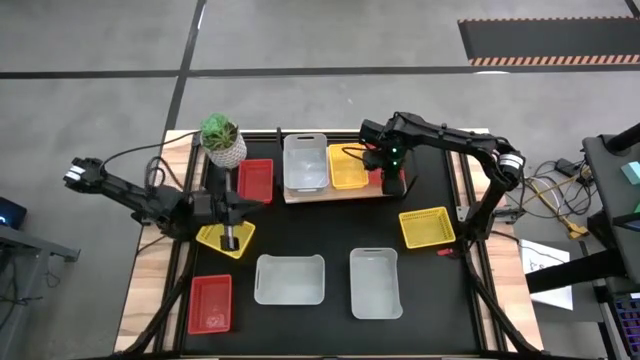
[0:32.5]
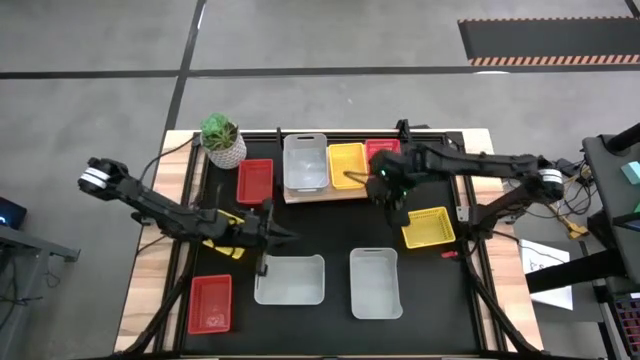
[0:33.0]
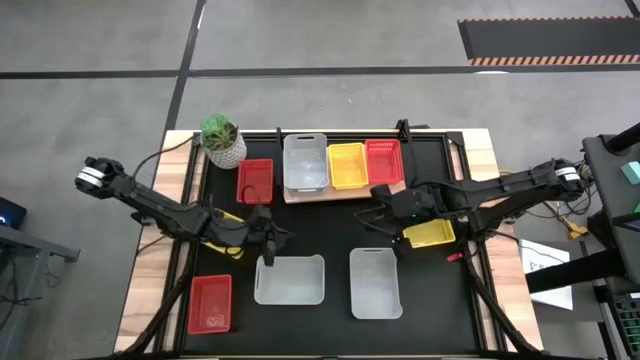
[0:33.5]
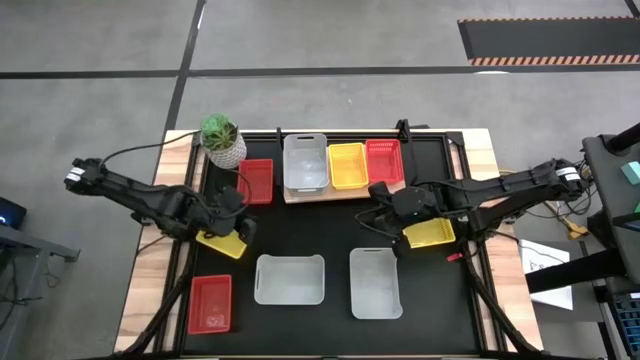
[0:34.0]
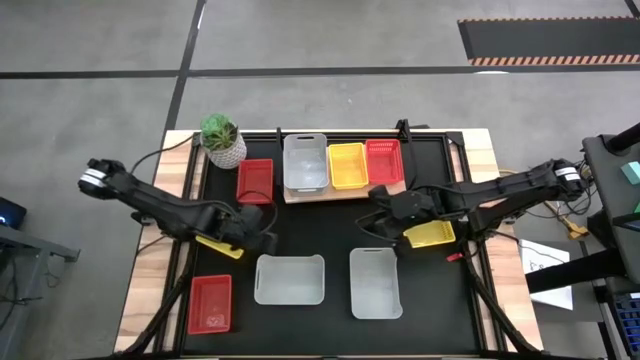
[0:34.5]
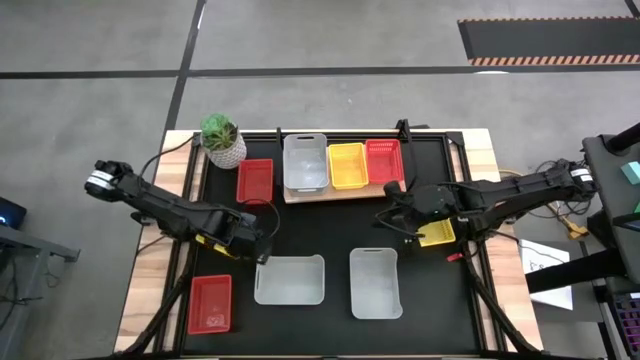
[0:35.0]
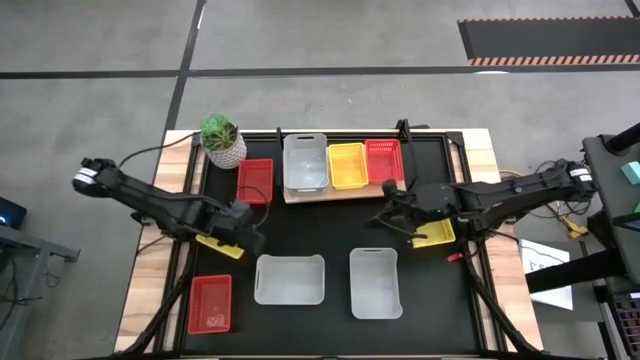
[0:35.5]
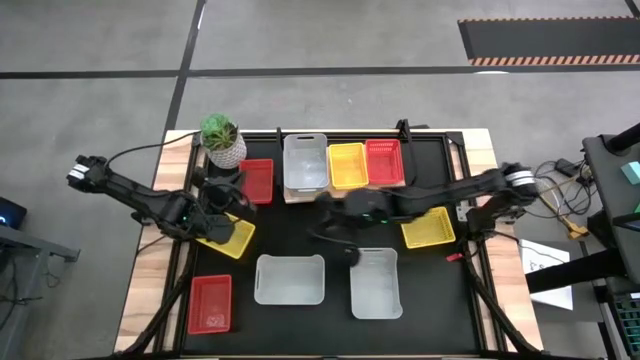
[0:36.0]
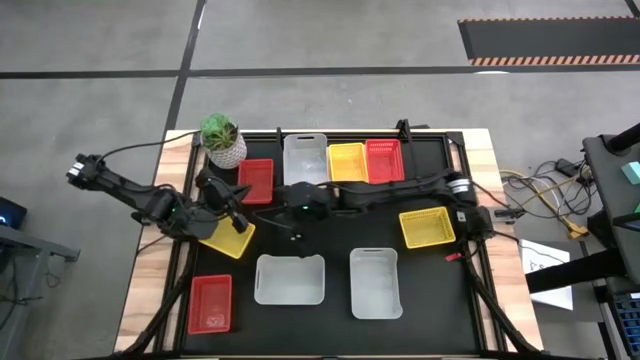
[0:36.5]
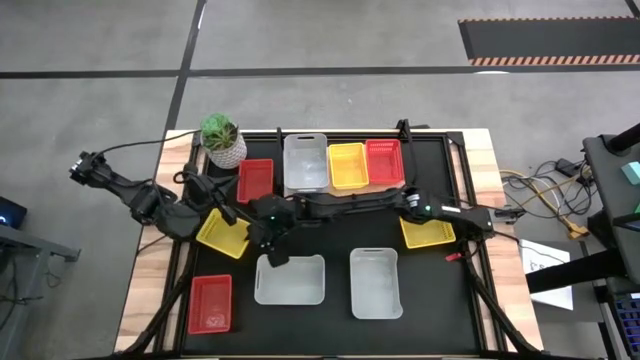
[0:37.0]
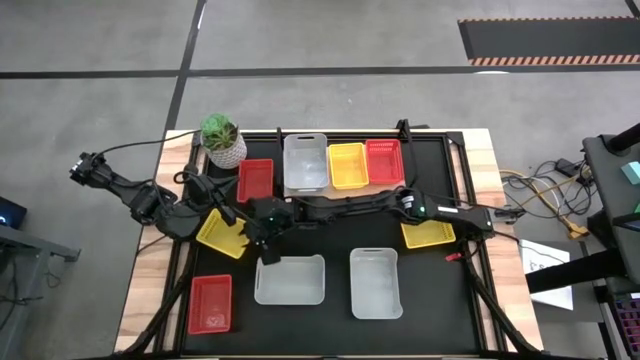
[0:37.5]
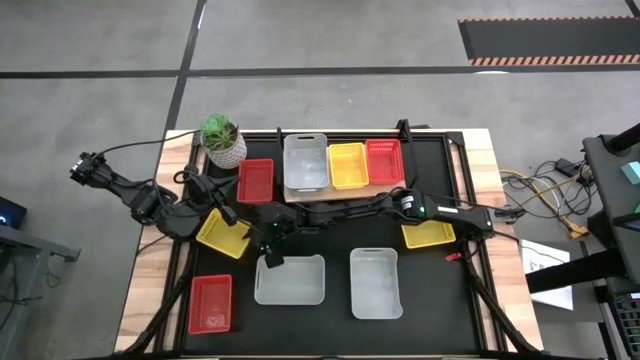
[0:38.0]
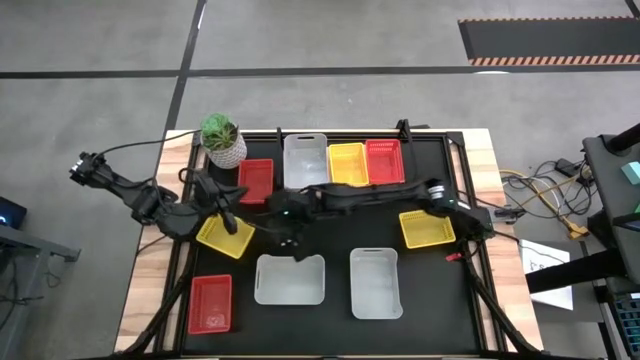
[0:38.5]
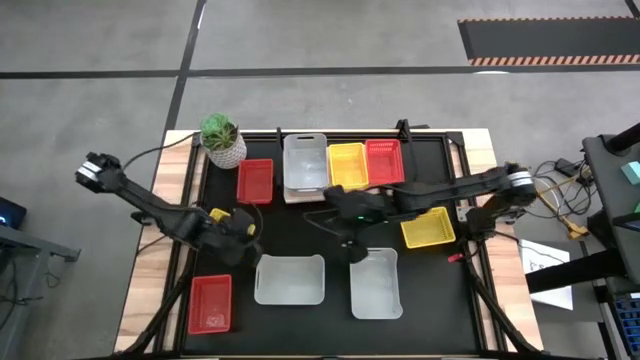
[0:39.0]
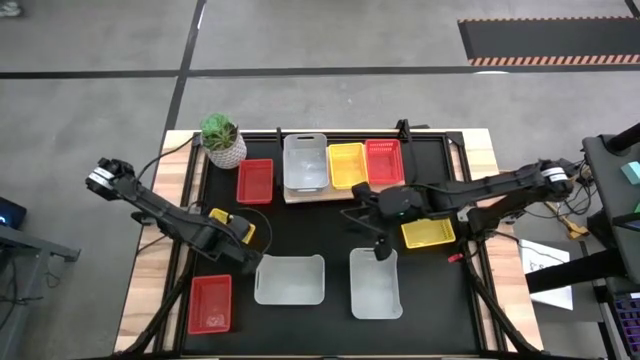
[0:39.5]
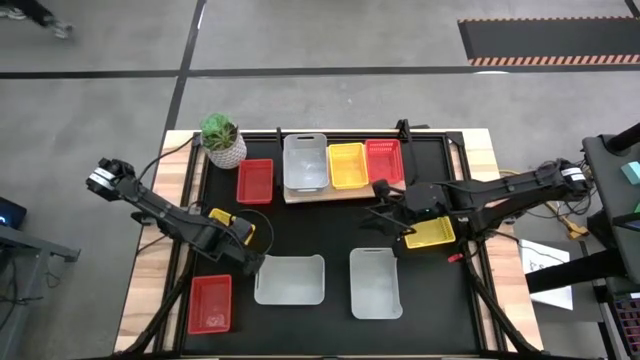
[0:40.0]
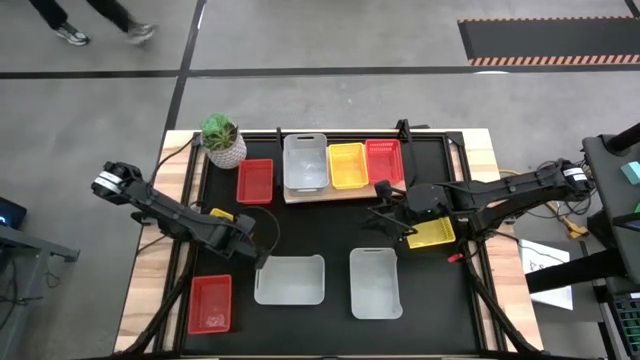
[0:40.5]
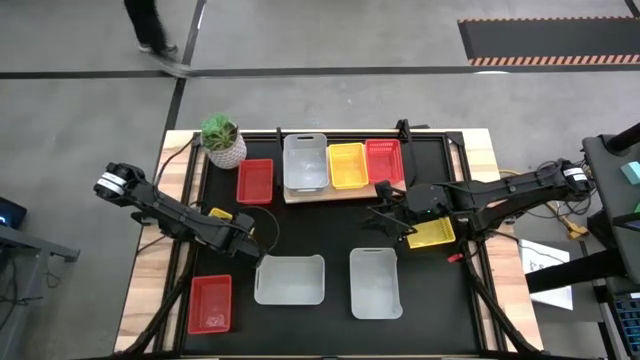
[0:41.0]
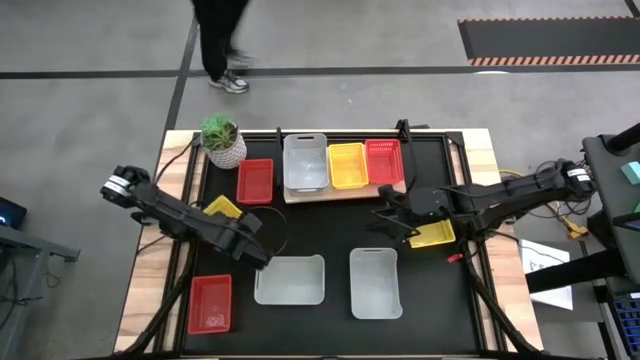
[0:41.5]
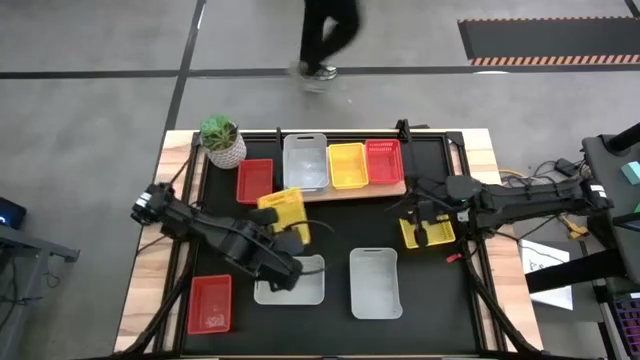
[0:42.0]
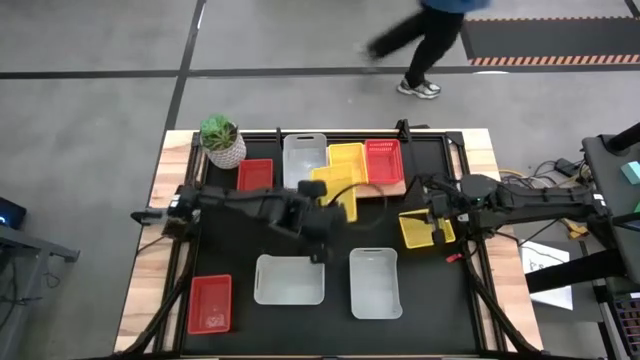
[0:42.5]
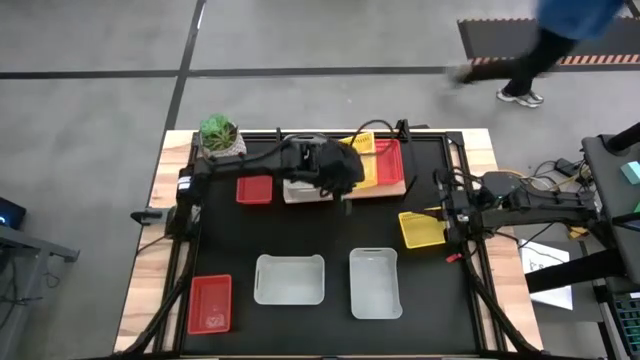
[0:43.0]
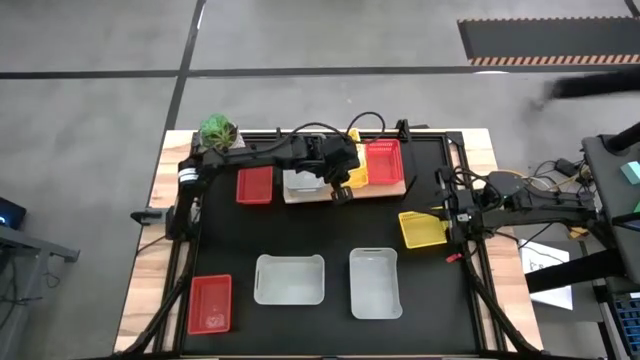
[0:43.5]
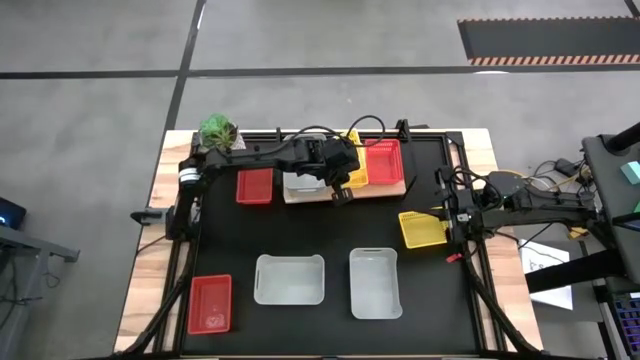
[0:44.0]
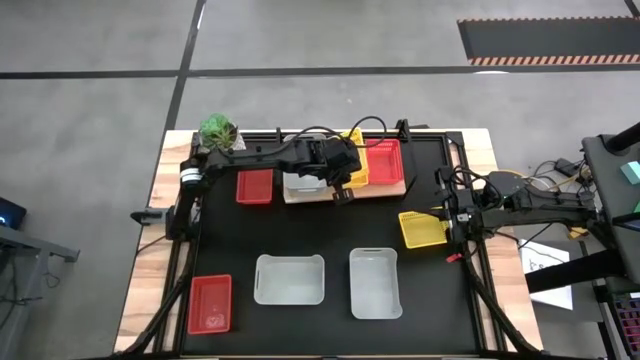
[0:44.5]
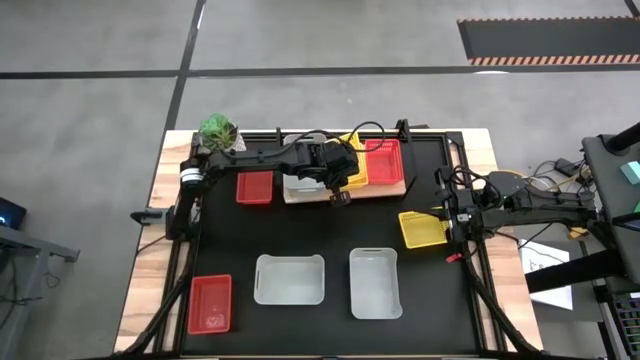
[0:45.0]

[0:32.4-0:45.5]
Task: Stack baskets on shelf by color
Stack the left yellow bin on top of the yellow bin on the shelf

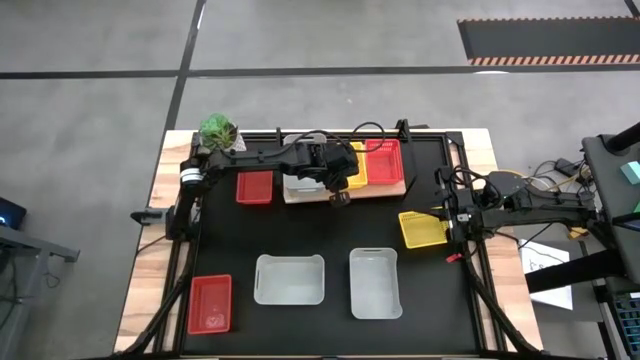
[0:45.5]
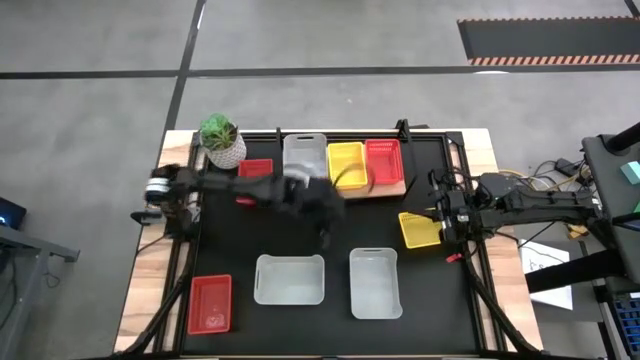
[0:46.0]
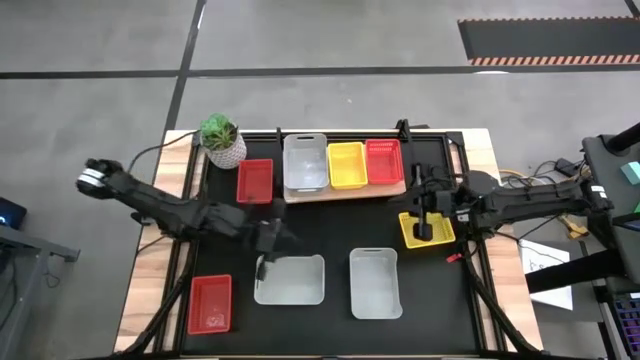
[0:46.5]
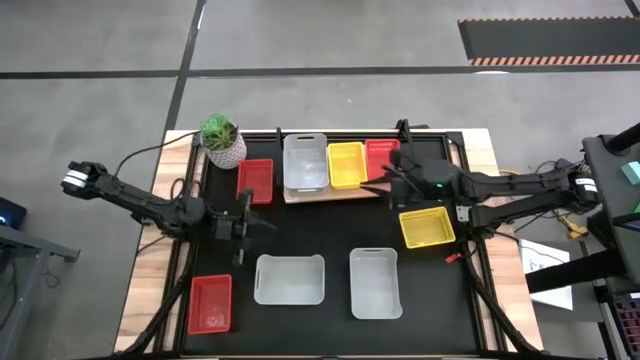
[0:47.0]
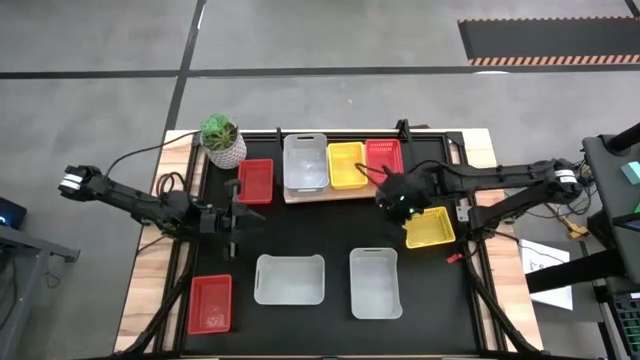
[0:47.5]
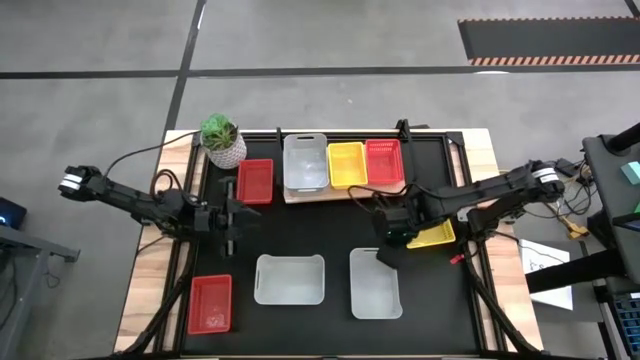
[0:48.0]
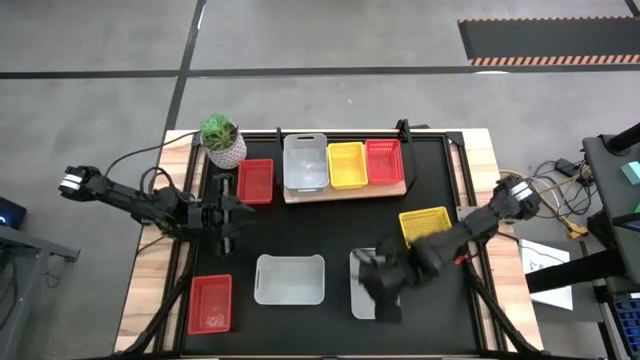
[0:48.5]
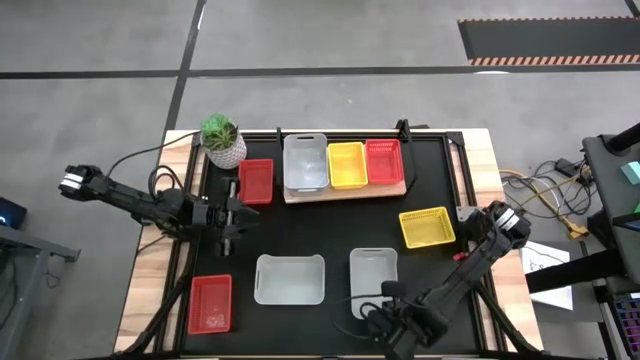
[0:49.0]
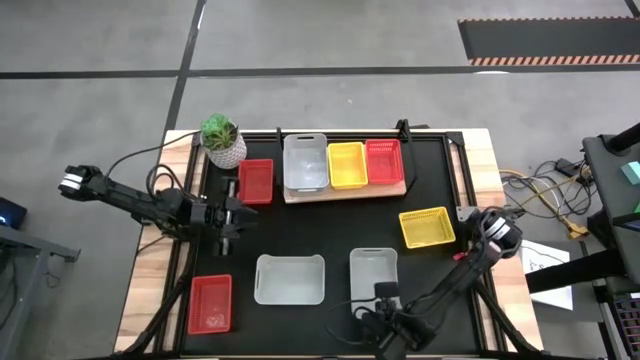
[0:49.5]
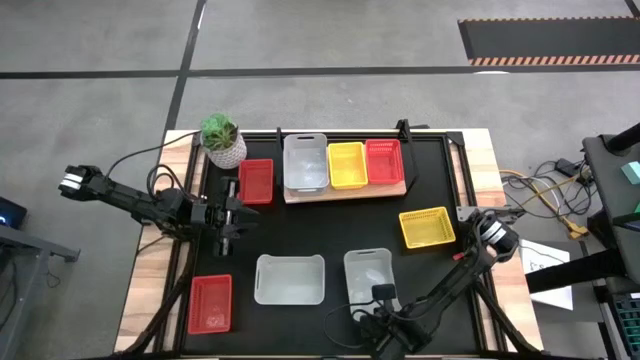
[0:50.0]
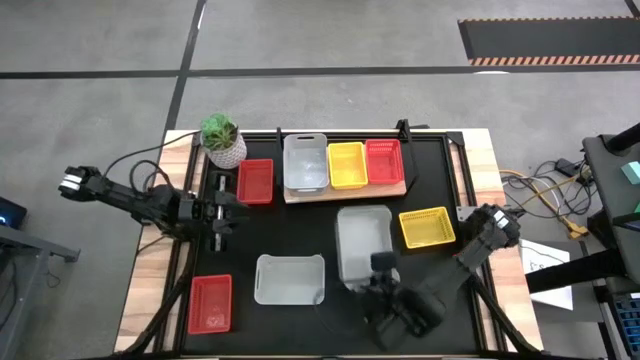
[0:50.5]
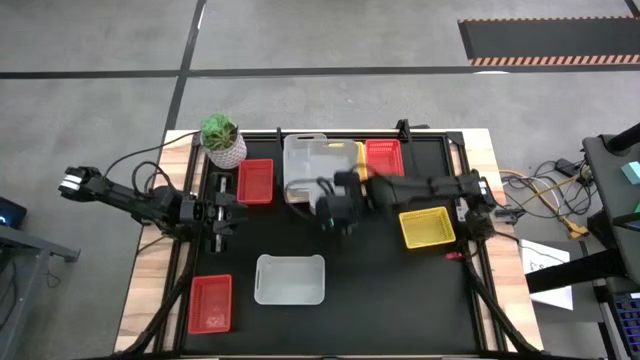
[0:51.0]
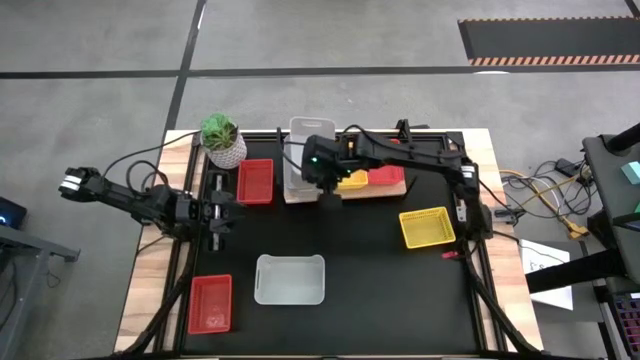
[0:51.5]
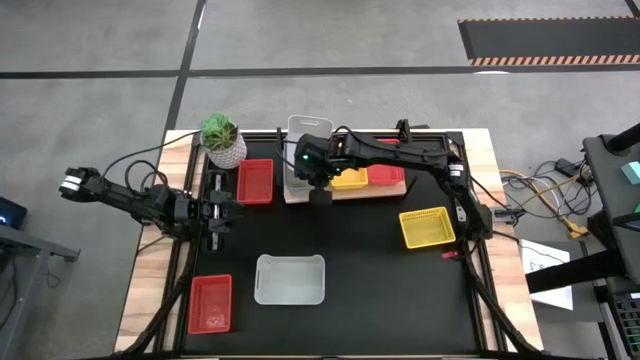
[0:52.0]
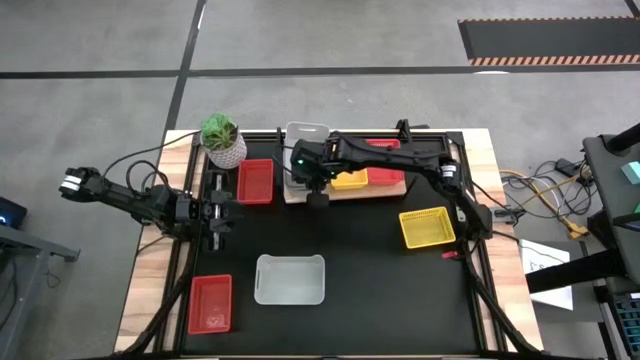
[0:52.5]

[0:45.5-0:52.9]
Stack the right gray bin on top of the gray bin on the shelf
